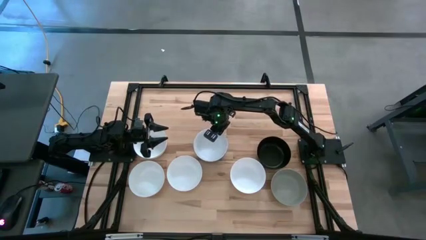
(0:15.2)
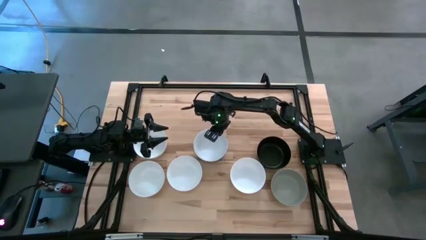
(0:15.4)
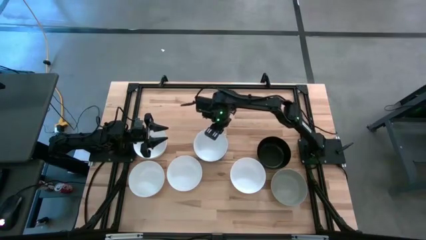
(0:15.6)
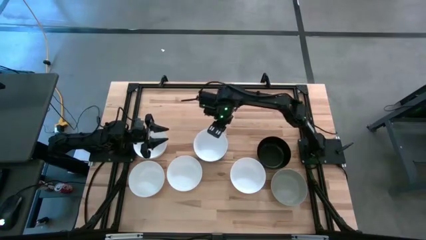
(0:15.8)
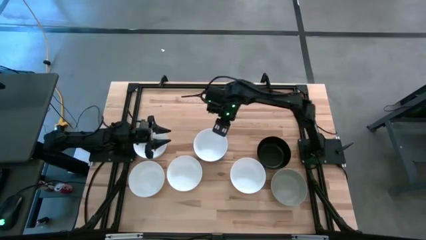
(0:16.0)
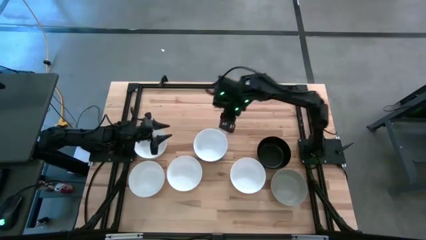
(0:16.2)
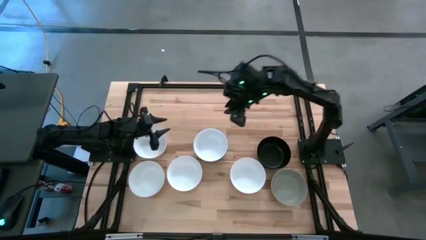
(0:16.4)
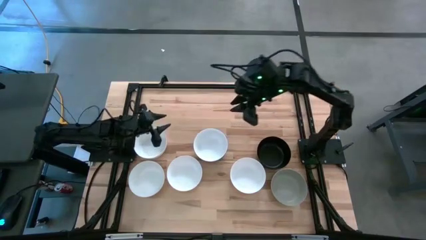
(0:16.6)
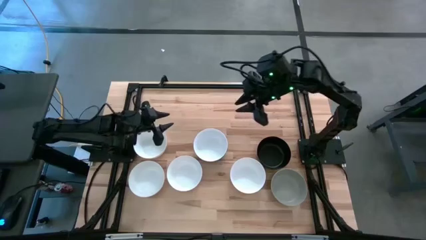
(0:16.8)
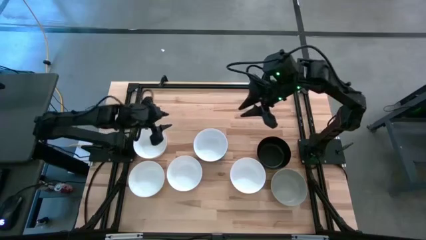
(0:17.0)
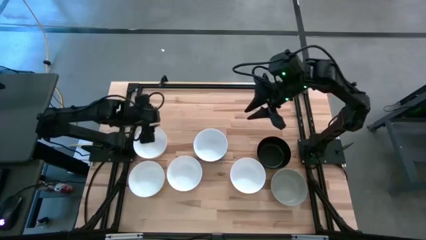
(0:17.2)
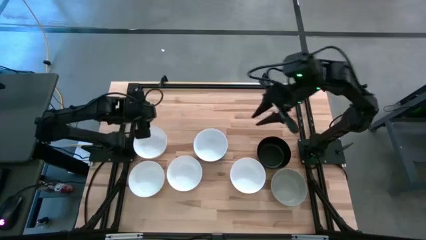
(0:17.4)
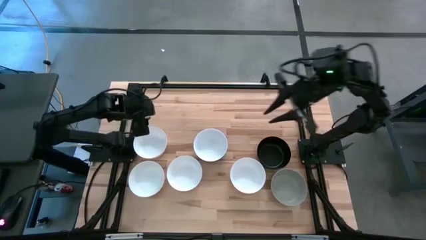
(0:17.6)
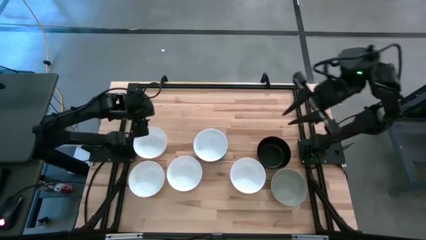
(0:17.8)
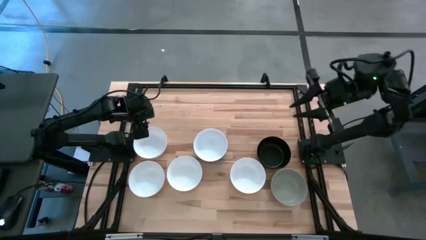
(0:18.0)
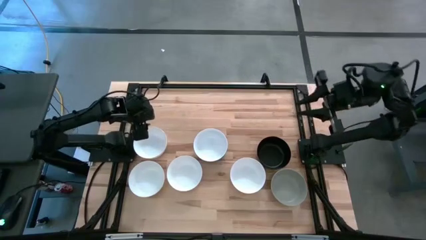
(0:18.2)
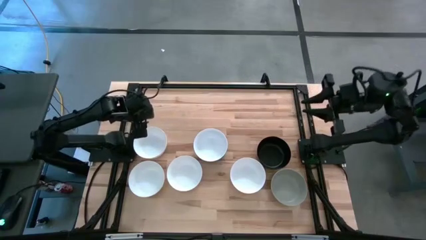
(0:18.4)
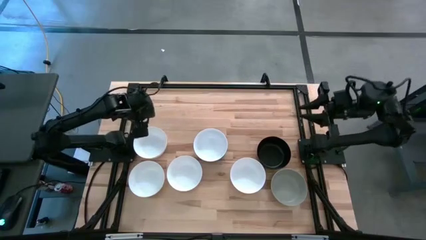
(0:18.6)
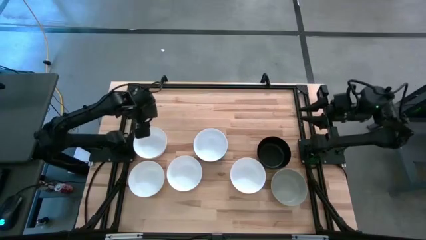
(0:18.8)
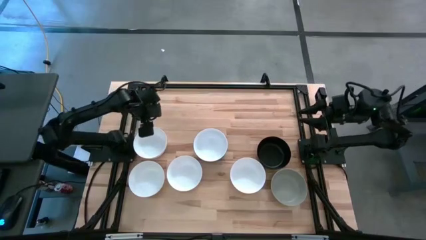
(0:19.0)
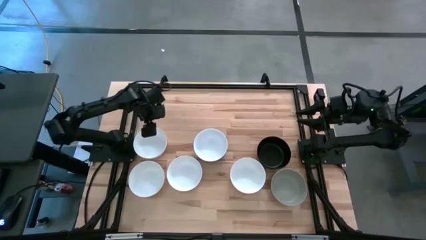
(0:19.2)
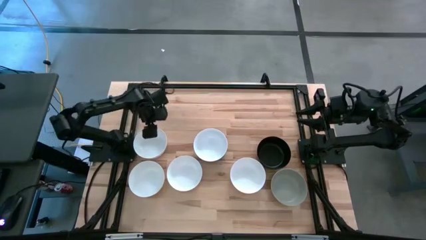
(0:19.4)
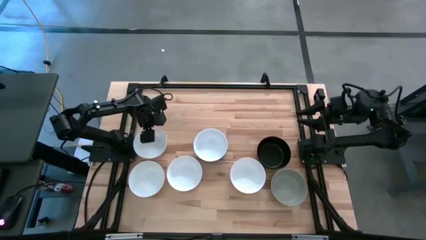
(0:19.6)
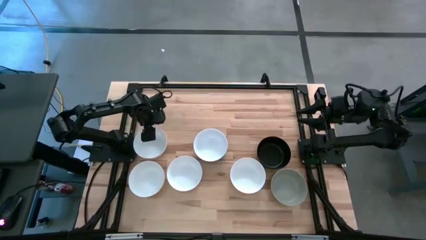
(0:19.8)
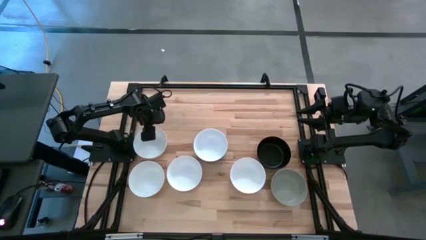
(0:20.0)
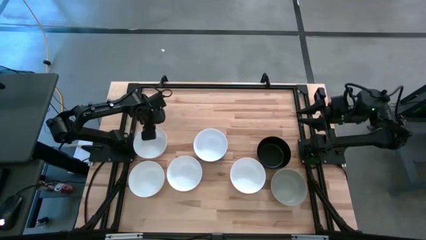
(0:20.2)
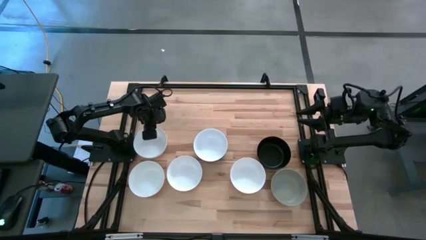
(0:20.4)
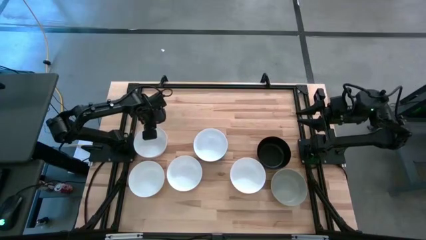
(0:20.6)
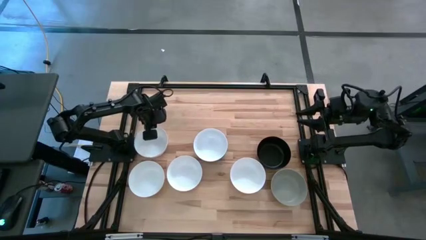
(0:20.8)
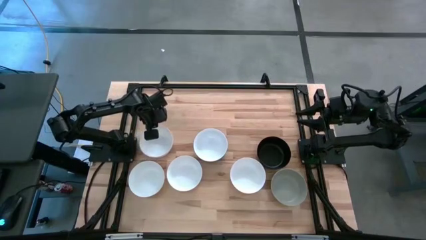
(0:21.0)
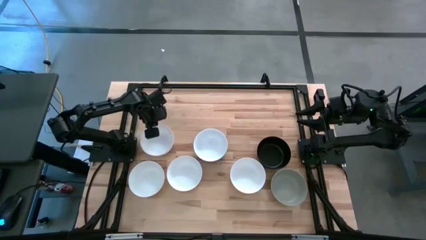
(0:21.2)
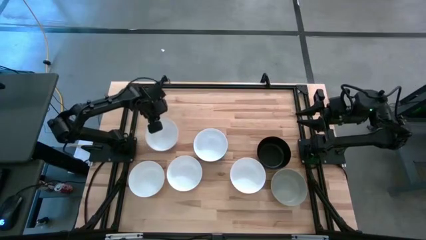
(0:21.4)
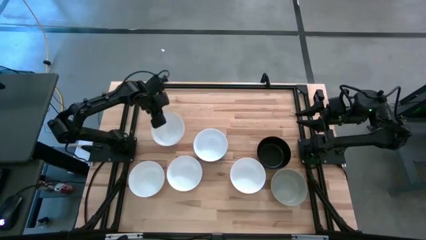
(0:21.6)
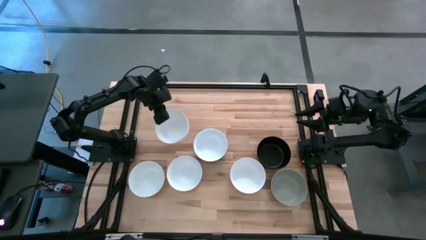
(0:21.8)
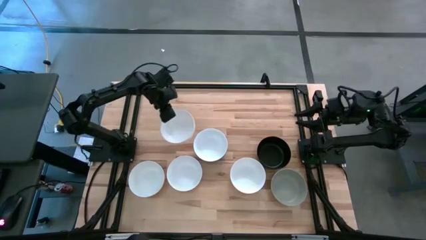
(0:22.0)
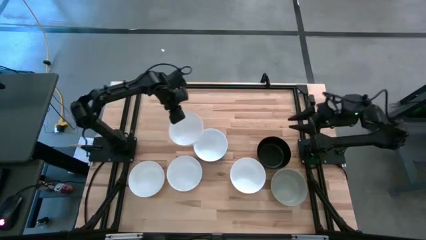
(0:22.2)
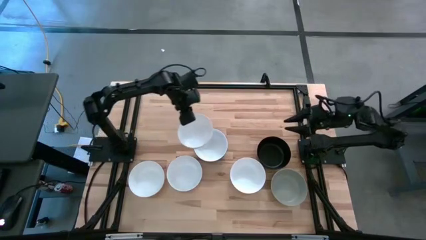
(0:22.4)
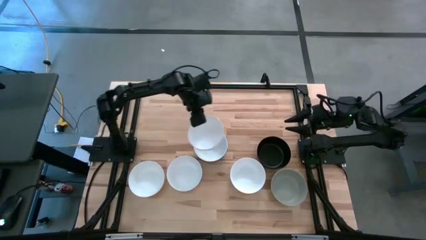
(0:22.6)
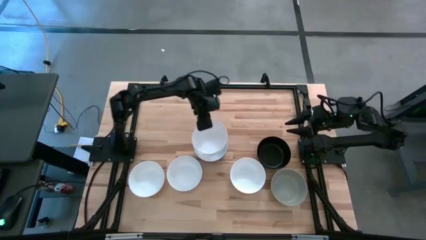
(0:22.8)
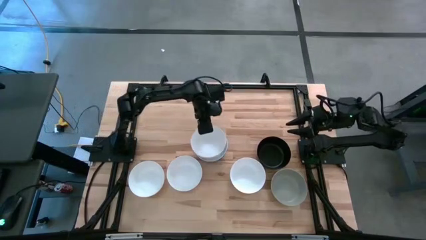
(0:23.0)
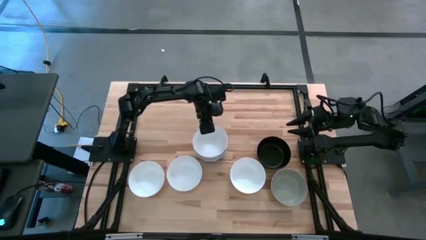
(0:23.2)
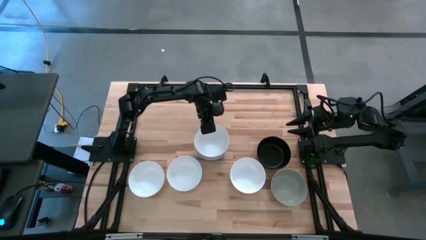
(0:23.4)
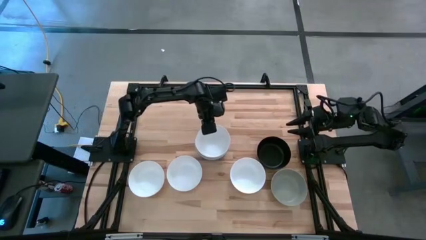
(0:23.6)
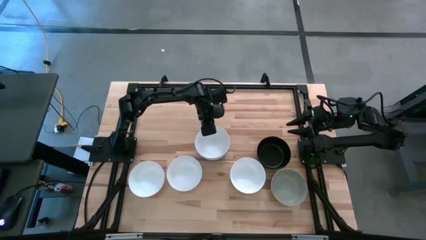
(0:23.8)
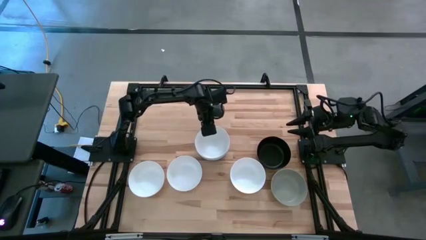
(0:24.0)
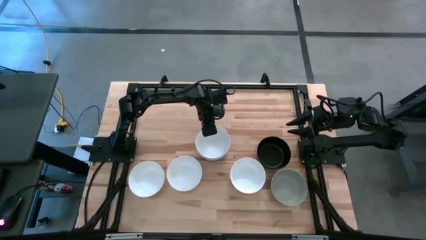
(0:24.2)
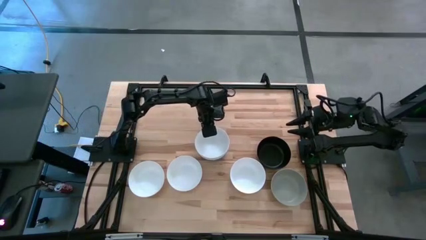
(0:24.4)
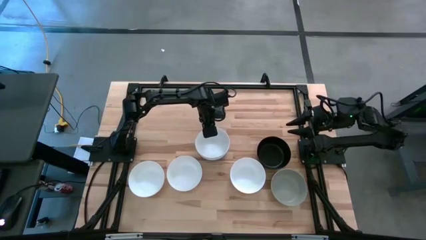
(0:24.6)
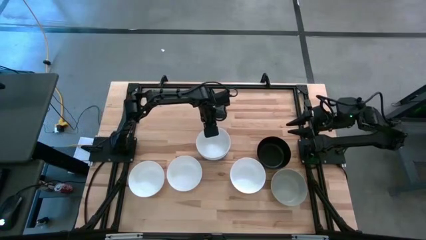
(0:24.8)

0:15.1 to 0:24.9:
Task: Nest bowls inside each other
Stack the white bowl on top of the white bowl

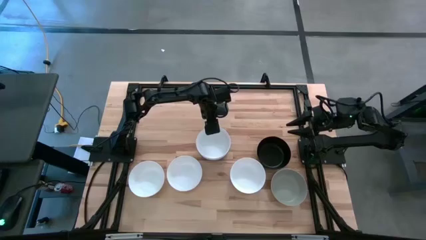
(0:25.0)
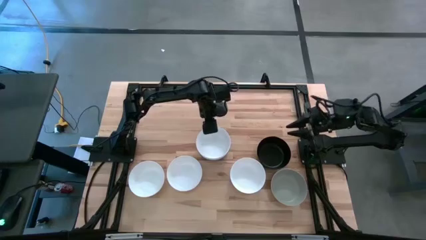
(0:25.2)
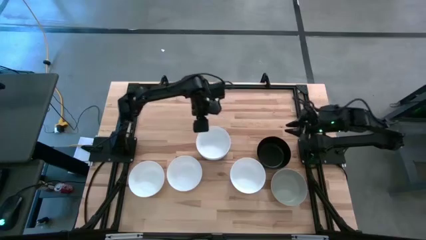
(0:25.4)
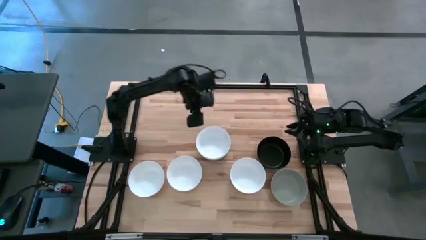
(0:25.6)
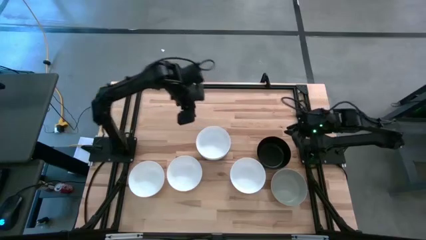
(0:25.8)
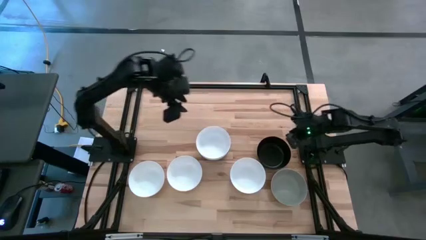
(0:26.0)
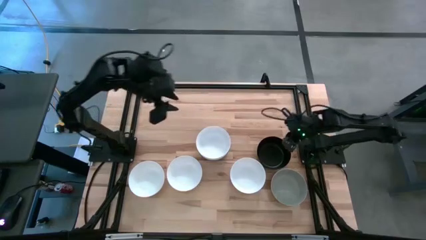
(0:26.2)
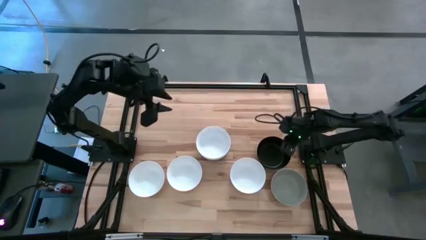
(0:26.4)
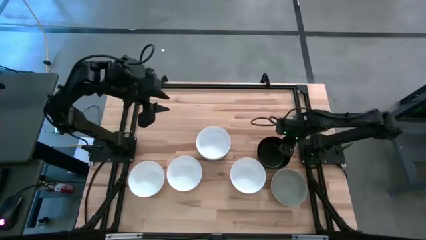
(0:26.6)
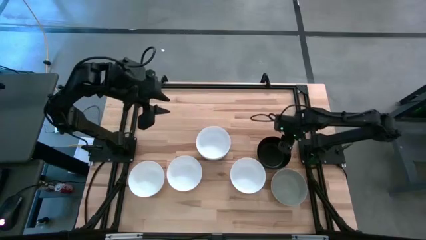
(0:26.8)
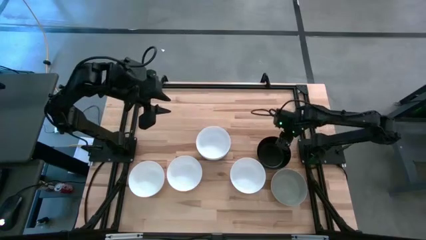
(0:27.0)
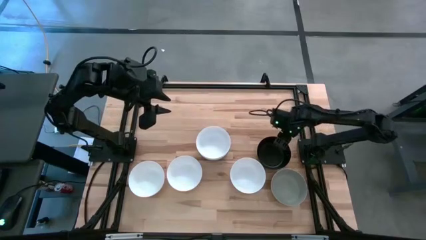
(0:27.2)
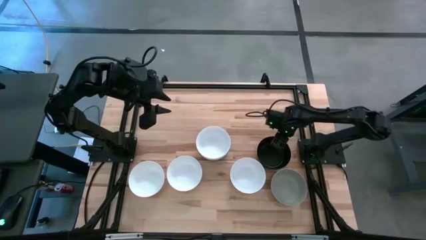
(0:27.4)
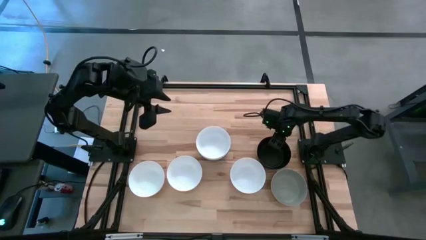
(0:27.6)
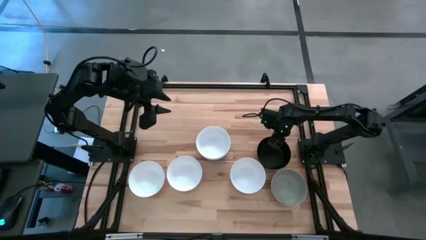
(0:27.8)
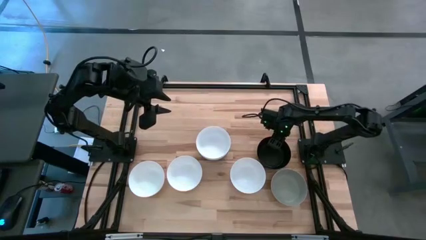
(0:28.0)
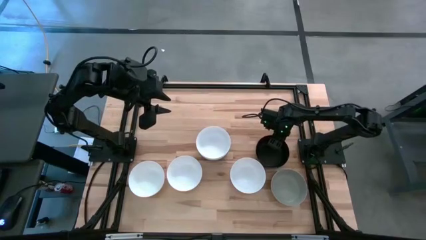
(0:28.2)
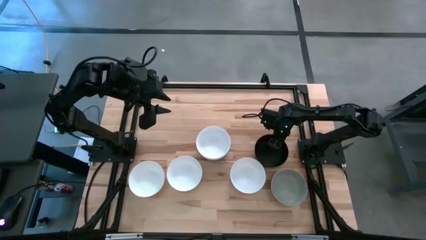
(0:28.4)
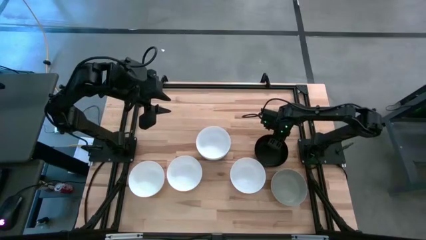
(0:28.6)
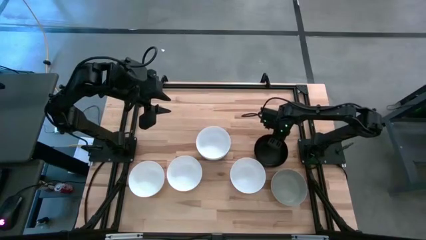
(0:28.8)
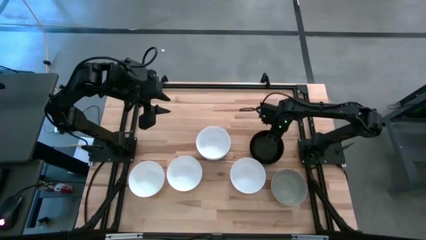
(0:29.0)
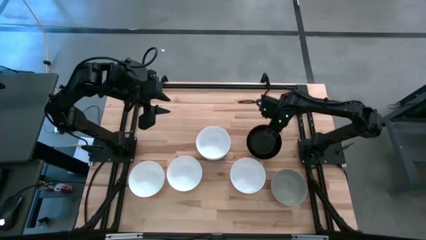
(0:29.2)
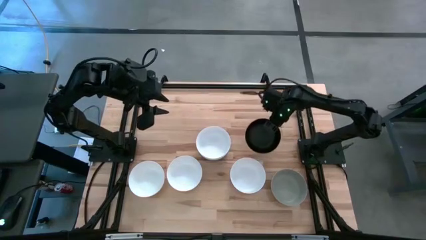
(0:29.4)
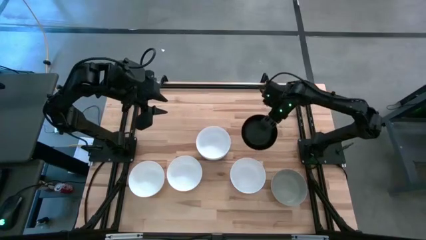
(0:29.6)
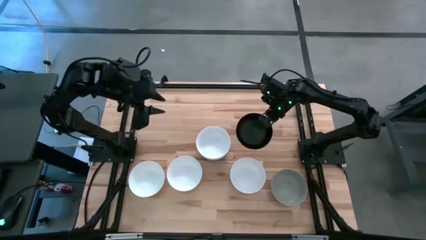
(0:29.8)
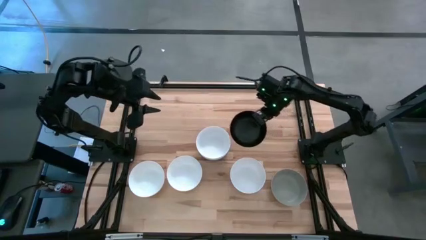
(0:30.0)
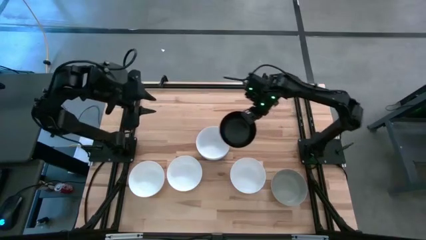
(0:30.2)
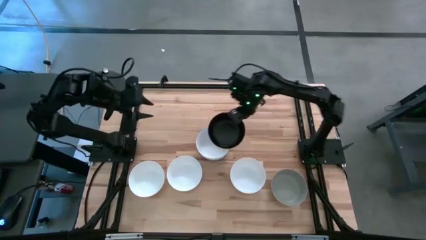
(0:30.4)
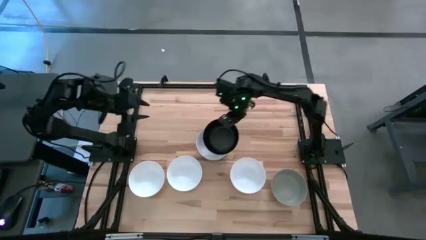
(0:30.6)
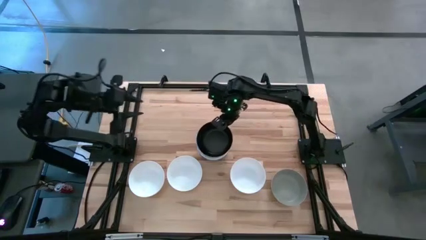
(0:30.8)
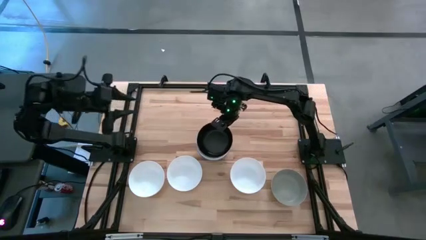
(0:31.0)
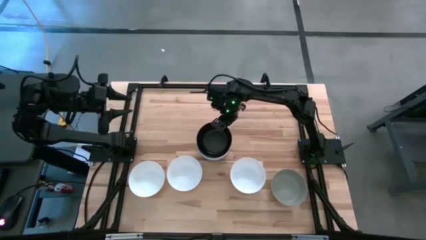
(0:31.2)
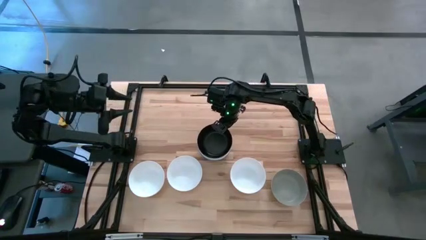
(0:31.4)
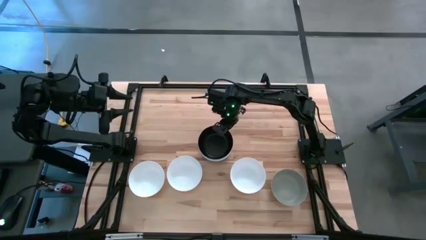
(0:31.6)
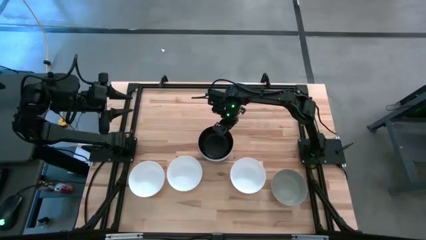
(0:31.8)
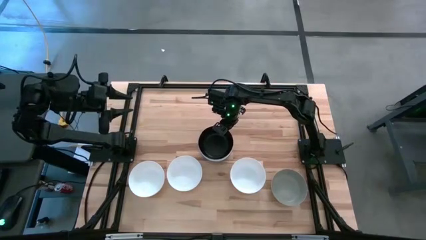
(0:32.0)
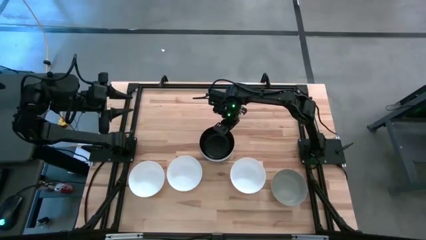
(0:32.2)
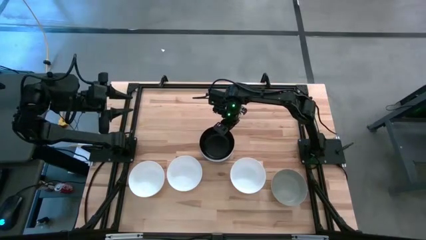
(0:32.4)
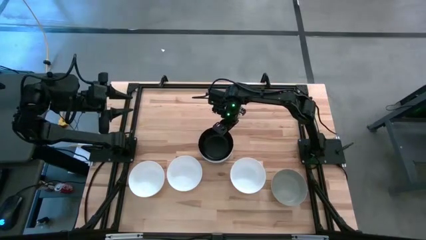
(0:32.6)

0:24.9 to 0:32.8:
Stack the black bowl on top of the white bowl
